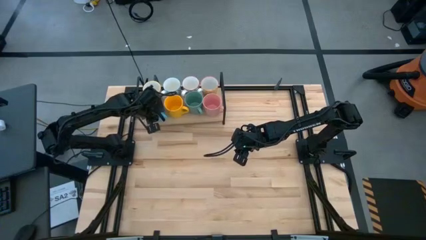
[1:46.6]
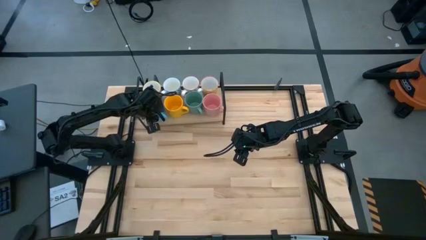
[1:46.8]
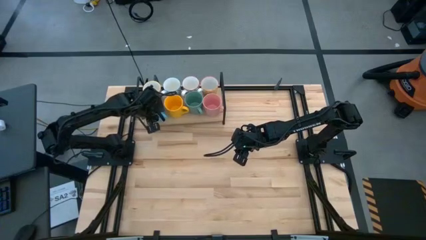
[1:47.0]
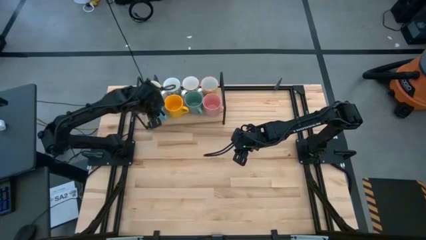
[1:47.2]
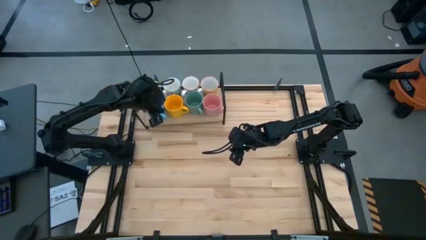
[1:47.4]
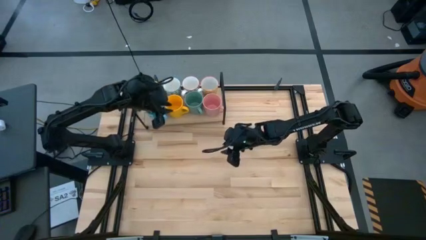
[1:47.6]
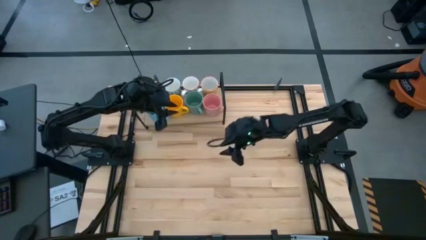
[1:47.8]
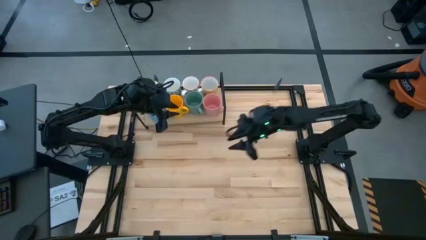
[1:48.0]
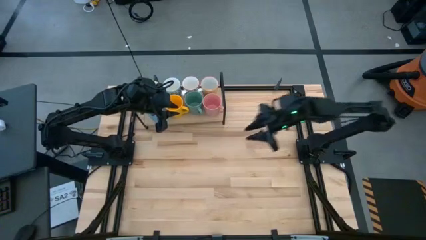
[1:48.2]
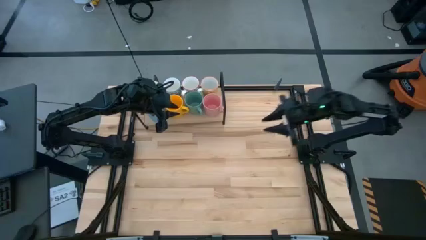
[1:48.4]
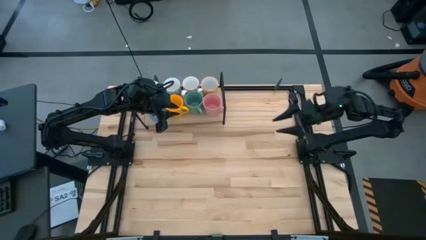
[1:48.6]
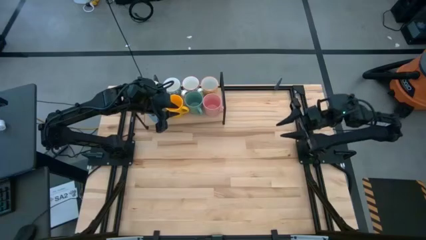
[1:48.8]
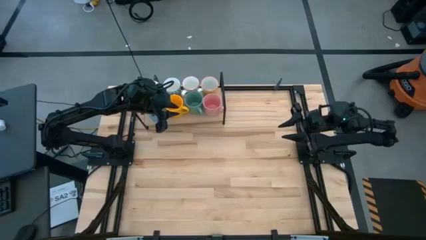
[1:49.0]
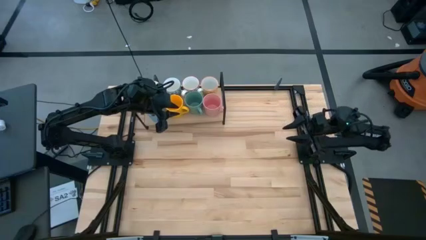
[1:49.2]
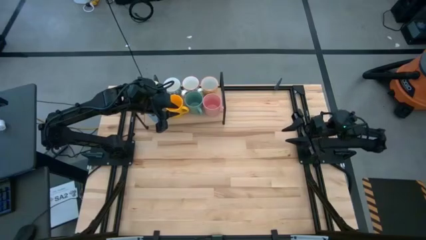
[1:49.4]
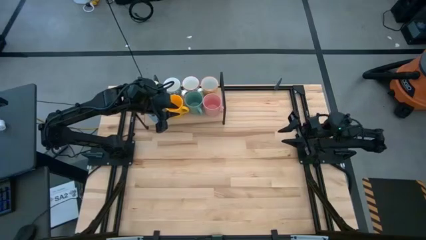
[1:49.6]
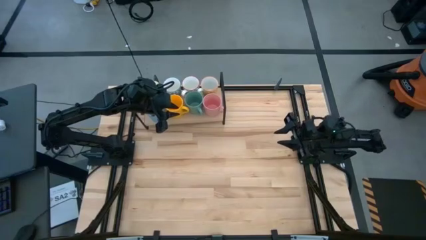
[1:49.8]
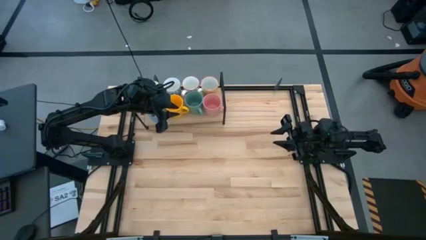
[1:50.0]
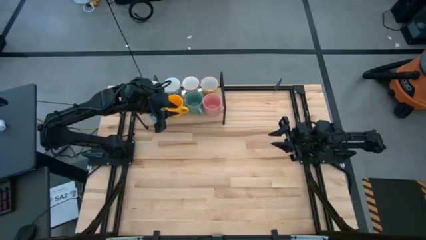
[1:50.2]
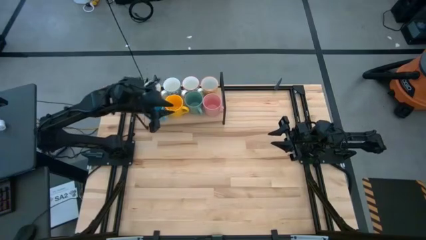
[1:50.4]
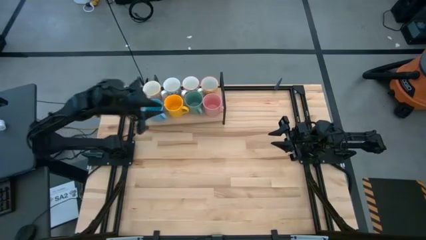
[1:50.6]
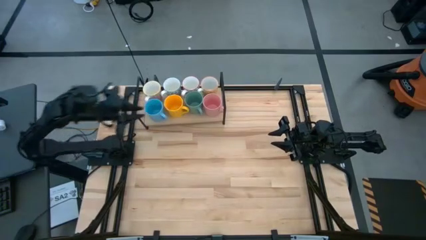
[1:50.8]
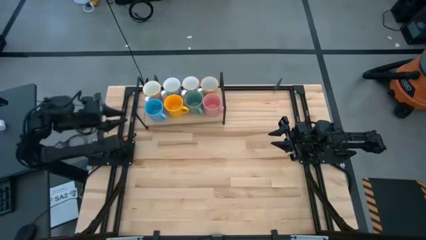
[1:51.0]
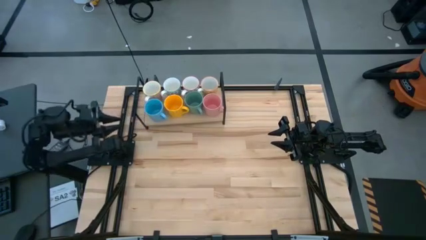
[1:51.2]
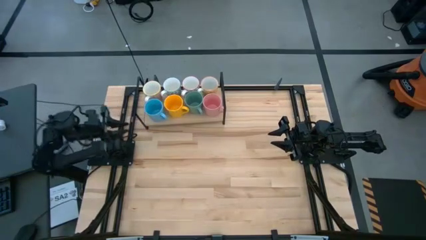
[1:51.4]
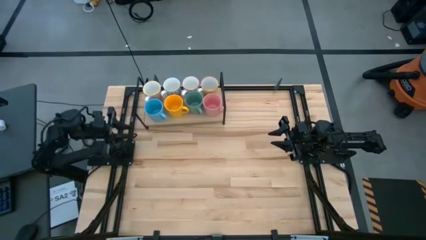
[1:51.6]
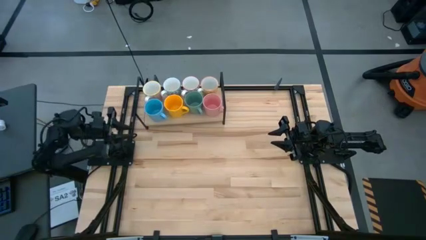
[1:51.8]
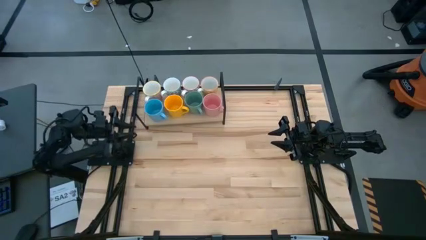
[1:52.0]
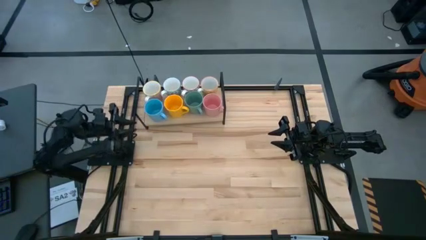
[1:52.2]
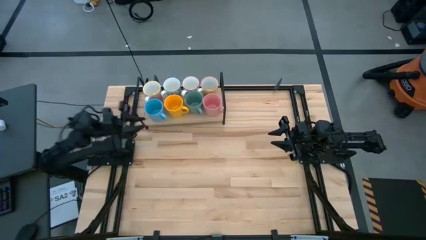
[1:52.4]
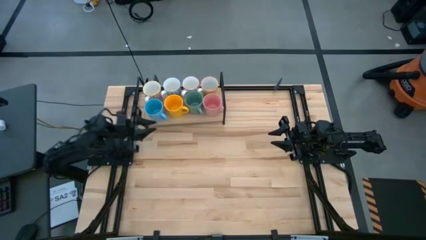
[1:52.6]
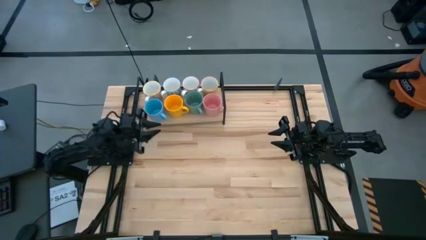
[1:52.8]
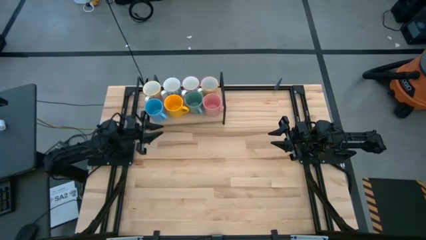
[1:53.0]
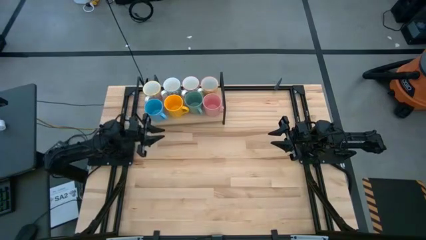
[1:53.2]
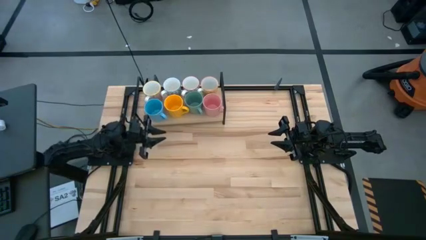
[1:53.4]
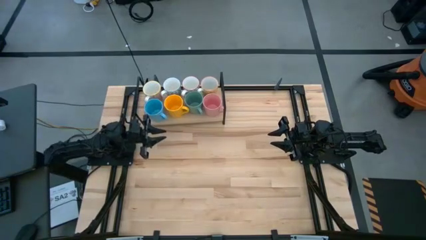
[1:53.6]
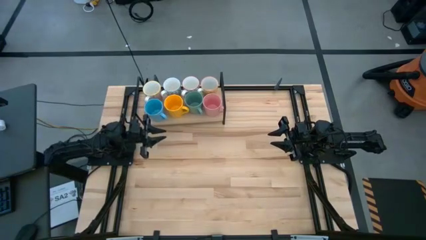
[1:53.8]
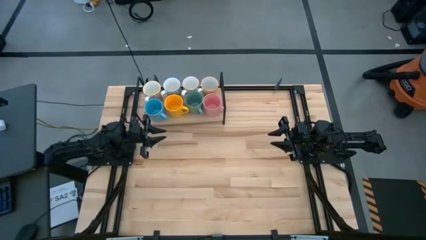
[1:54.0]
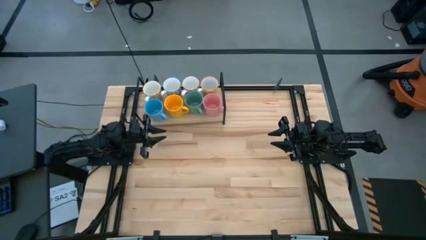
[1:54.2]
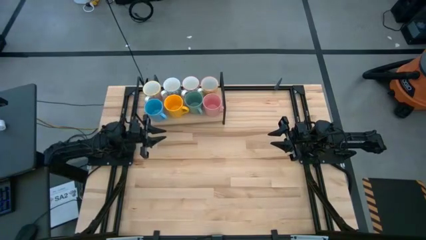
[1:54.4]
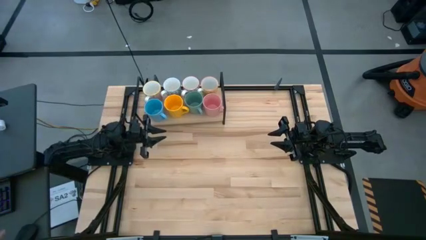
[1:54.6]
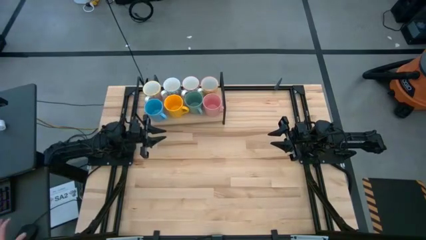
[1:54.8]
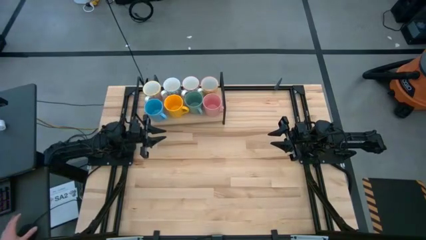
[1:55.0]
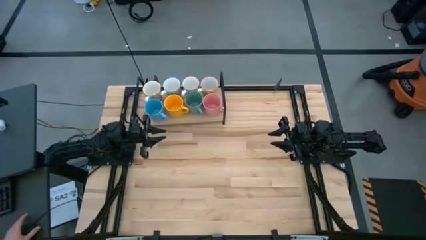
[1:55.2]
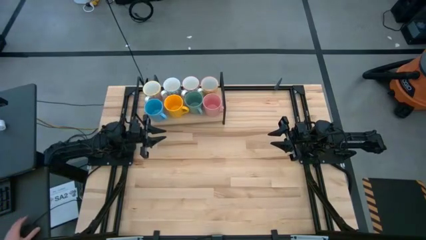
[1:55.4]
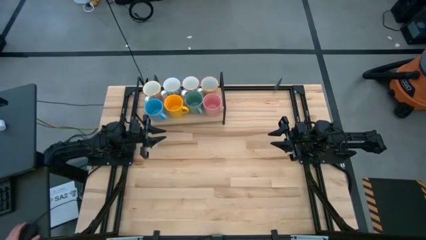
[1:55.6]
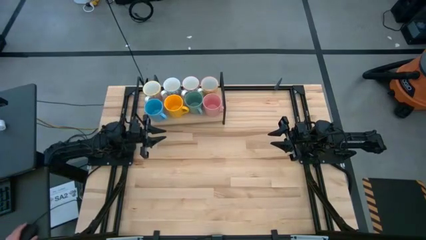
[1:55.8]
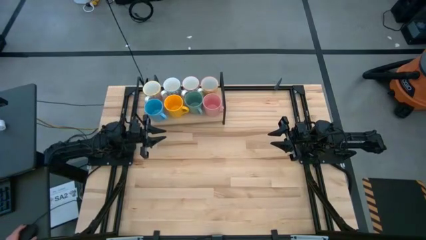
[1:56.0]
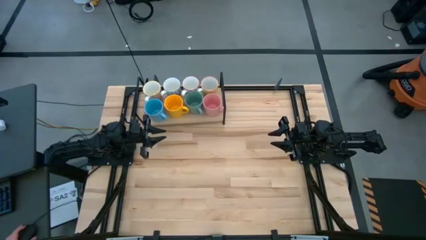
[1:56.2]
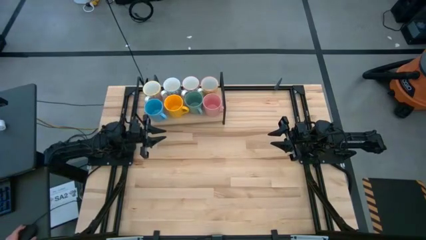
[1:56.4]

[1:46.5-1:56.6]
Task: Place coffee mugs
Return to Home Position
